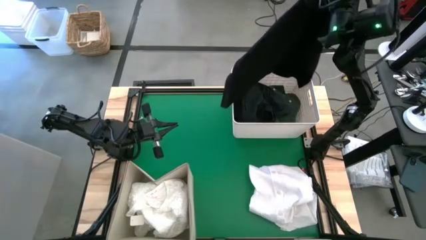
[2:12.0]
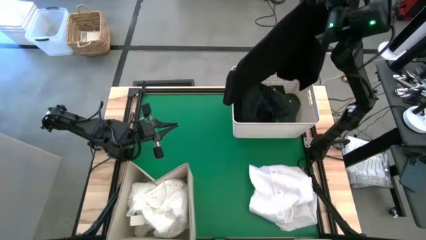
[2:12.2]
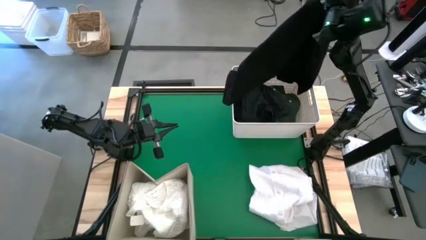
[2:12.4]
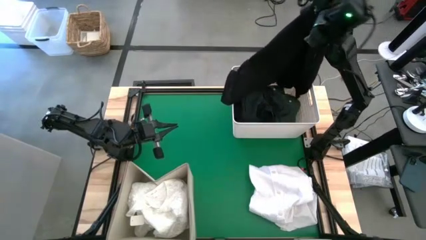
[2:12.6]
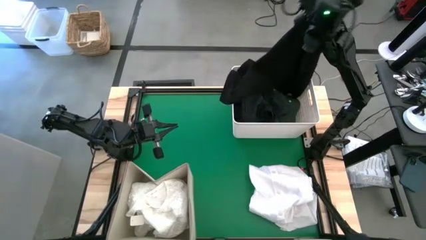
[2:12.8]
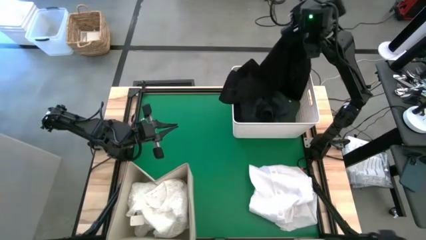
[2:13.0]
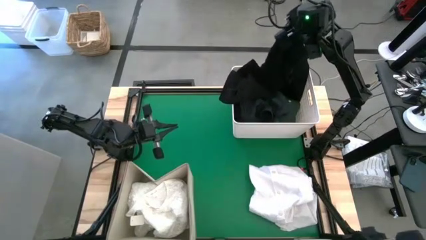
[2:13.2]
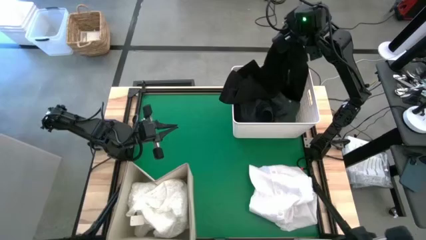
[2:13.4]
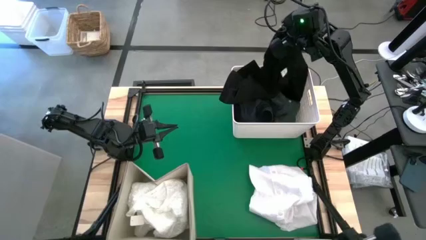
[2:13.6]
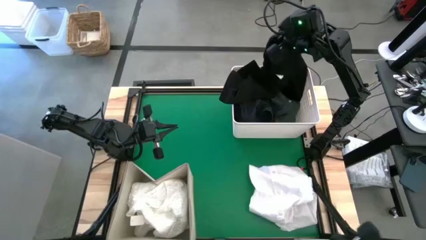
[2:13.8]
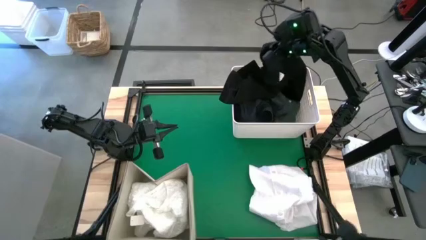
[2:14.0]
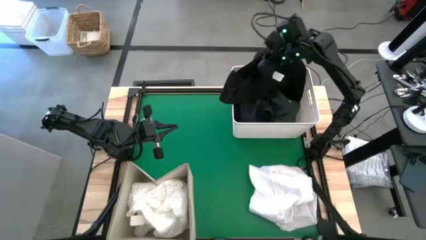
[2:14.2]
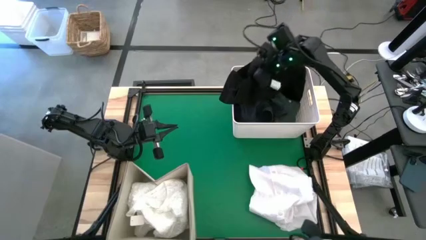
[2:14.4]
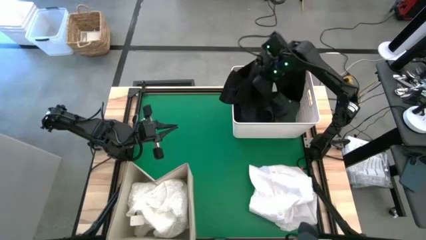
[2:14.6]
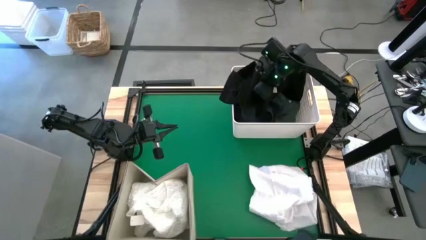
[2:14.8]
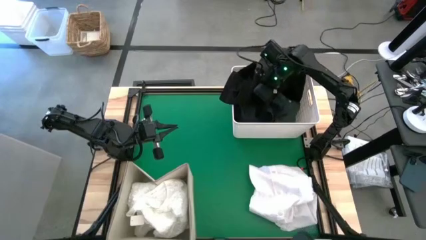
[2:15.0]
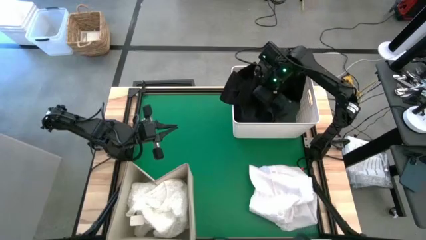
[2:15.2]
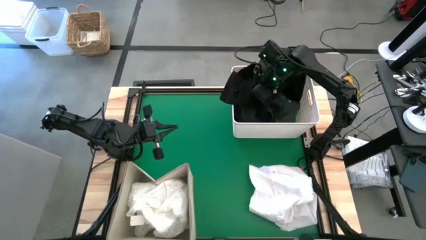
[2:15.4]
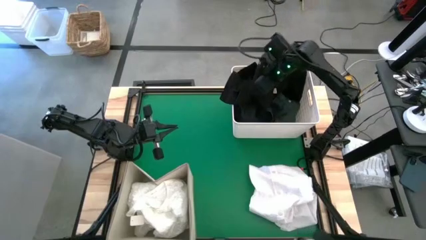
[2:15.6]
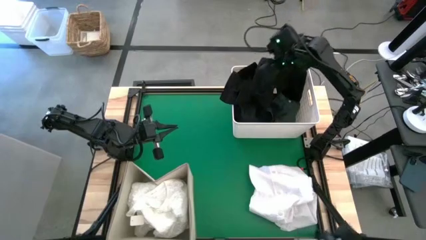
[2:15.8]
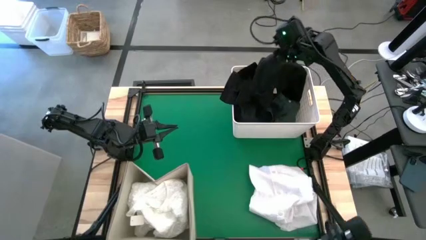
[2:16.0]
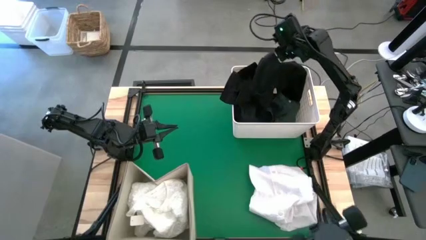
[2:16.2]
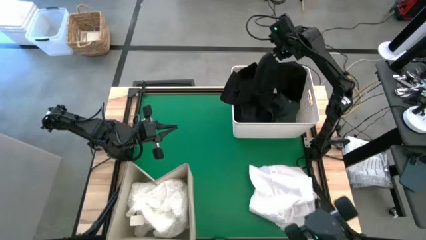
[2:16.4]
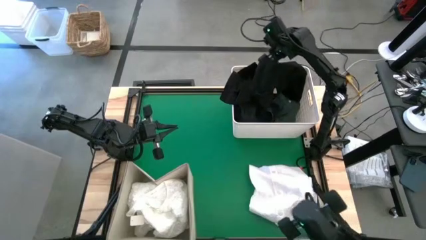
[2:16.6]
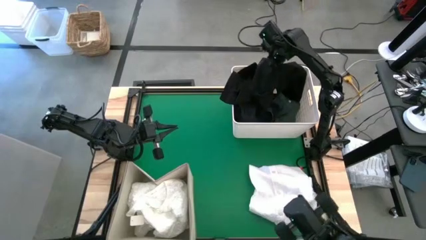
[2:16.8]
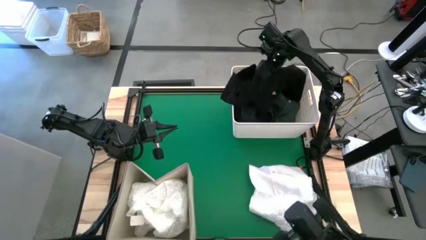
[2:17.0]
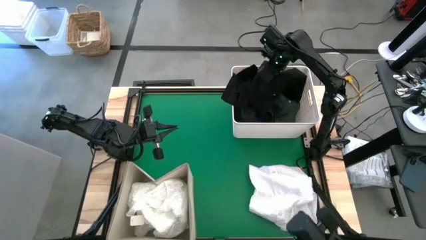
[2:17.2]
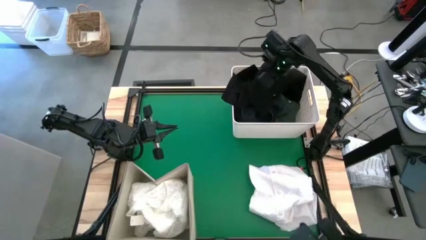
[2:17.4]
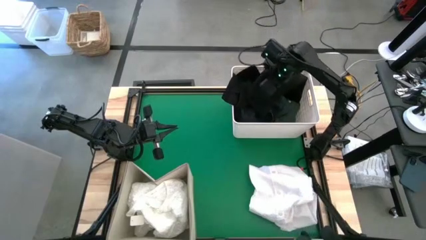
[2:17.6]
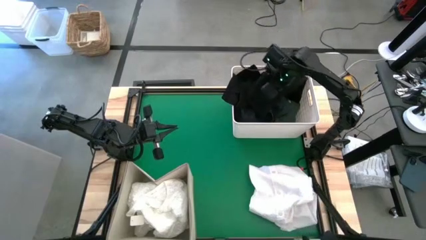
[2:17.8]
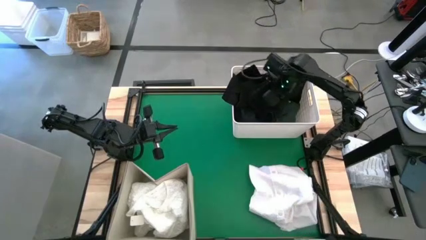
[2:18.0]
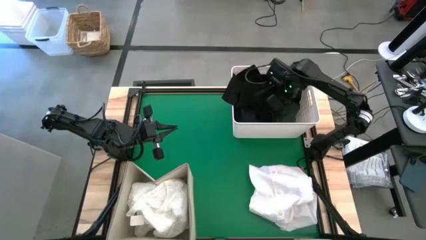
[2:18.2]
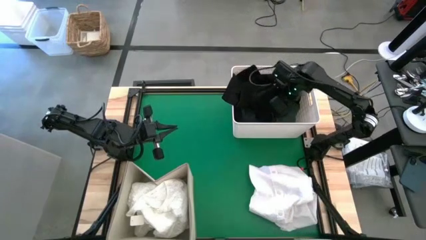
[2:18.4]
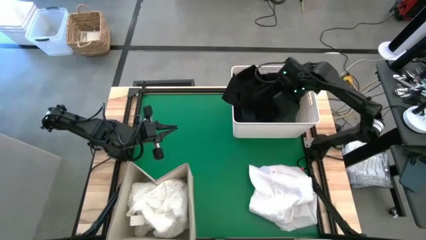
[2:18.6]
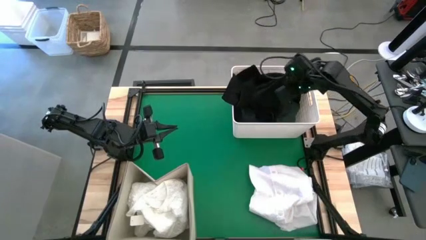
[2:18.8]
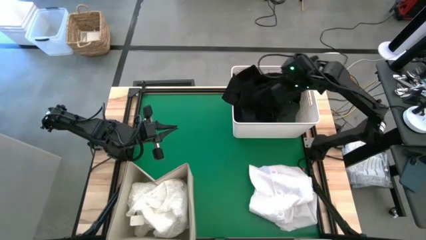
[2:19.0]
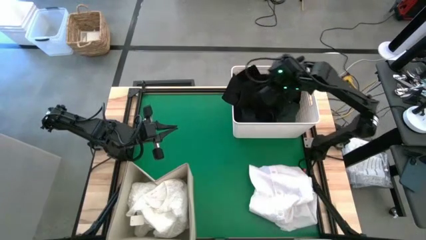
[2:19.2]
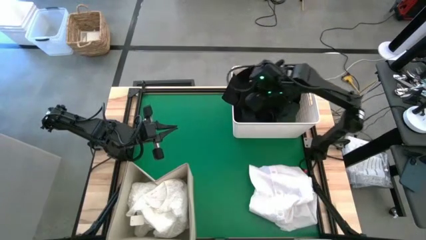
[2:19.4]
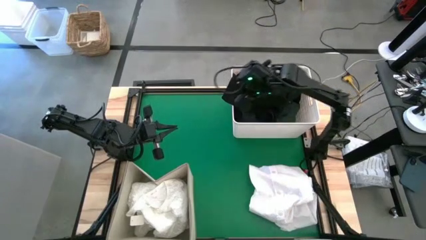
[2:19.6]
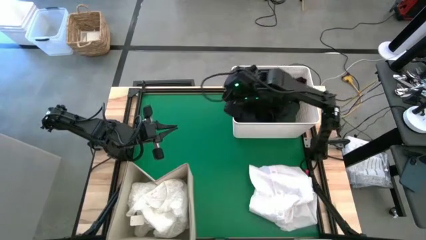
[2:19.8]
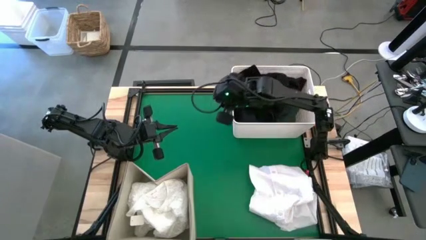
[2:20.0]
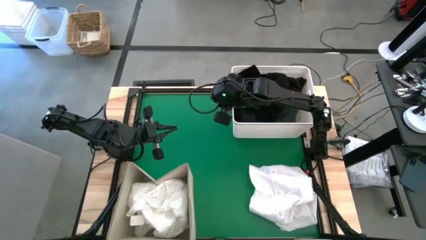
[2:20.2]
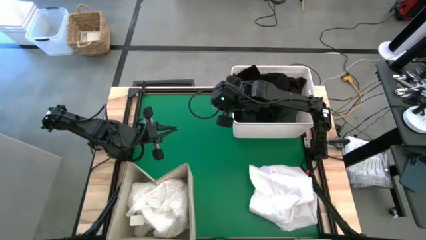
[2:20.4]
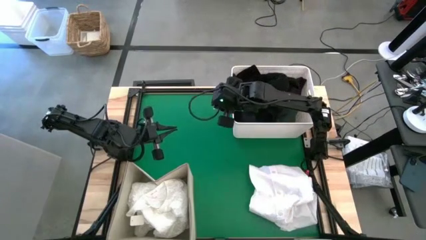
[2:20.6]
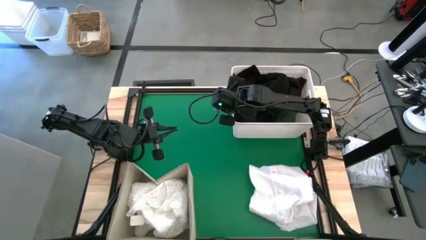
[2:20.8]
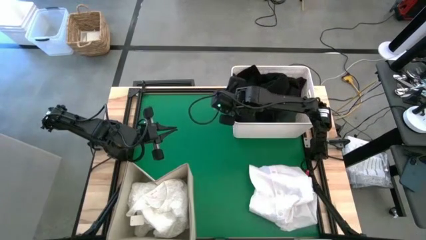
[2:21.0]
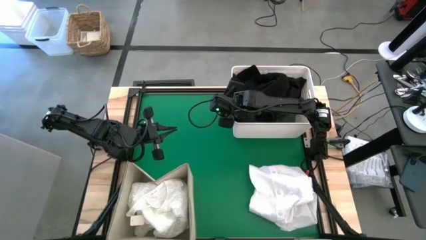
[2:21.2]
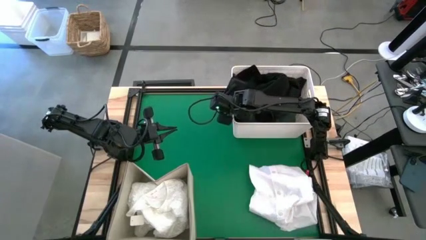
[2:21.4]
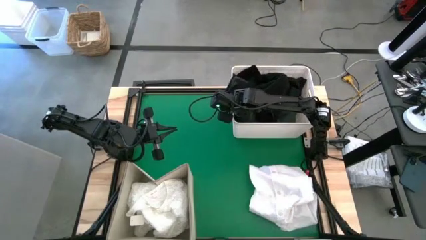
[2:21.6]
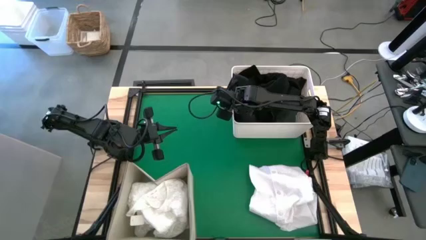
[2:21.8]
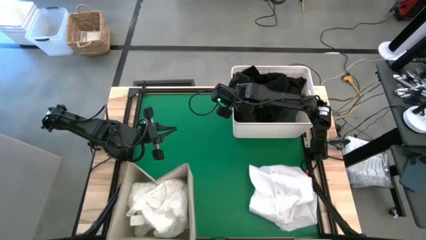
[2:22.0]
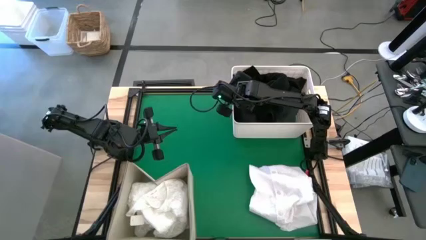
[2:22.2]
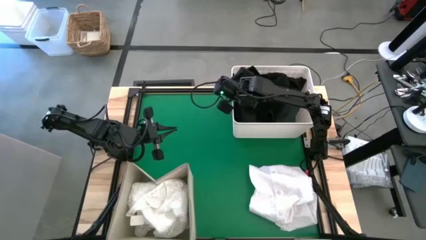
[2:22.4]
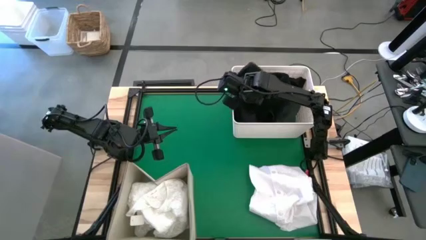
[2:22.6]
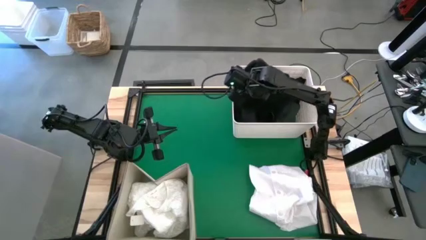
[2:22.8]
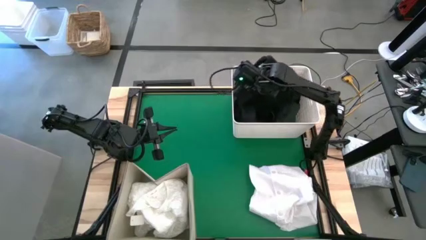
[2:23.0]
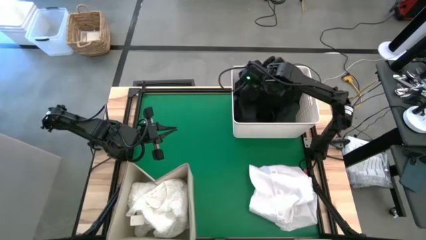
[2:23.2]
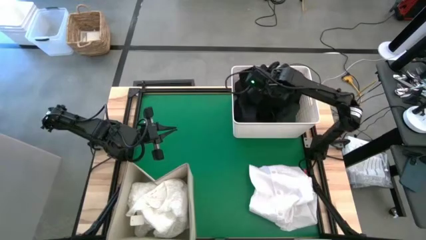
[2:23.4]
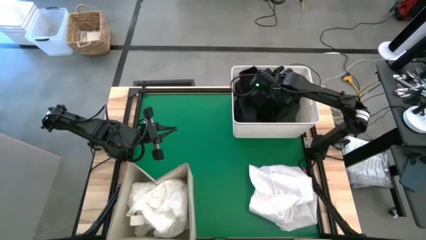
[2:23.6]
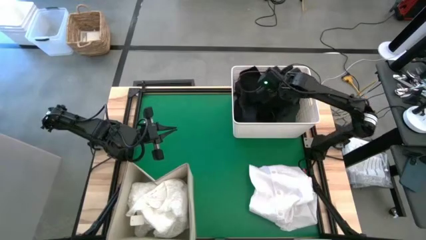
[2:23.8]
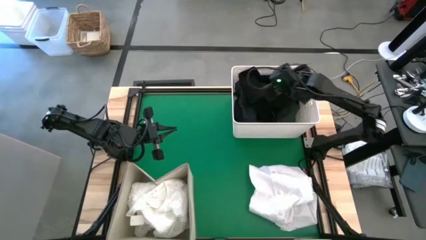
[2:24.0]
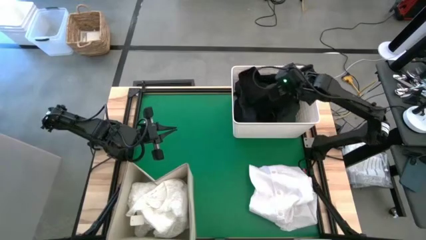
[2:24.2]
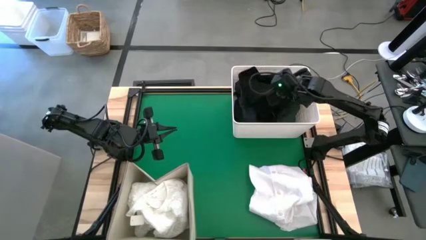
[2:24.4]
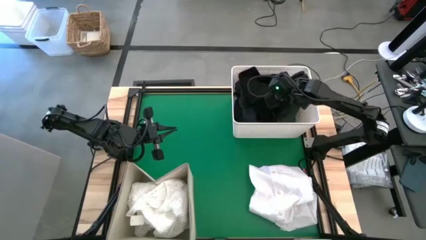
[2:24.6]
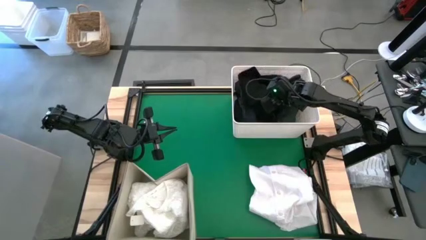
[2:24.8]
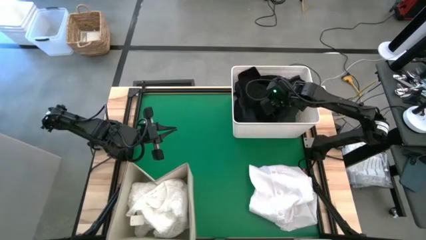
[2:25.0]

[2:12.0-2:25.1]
Task: Sort clothes
Put the black shirt into the top right white bin
